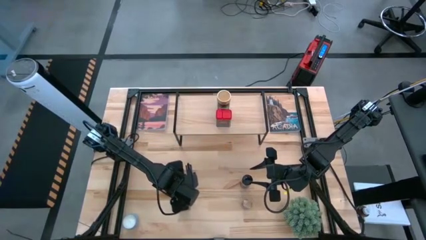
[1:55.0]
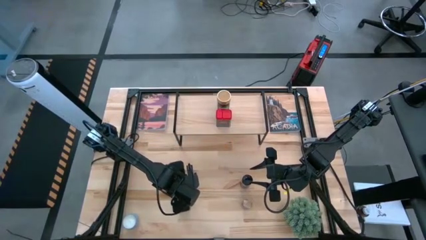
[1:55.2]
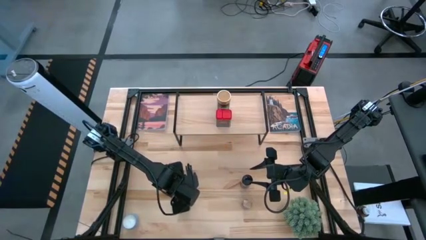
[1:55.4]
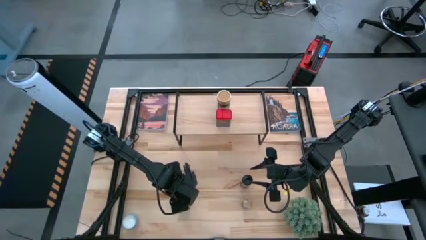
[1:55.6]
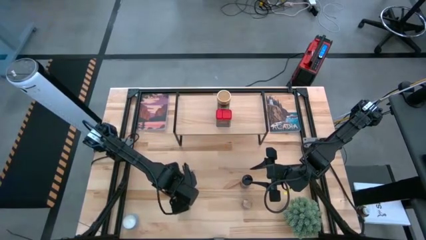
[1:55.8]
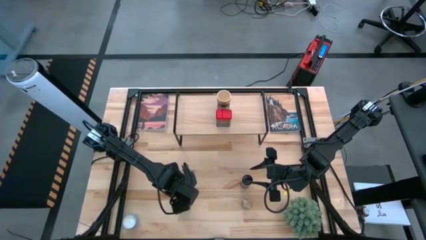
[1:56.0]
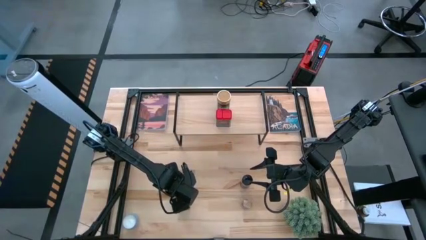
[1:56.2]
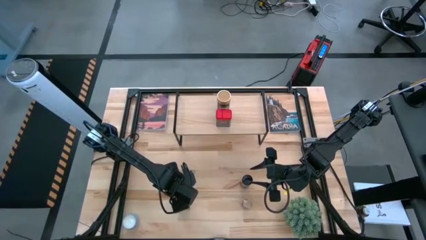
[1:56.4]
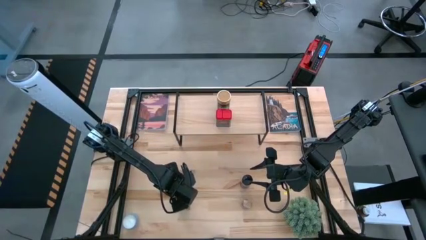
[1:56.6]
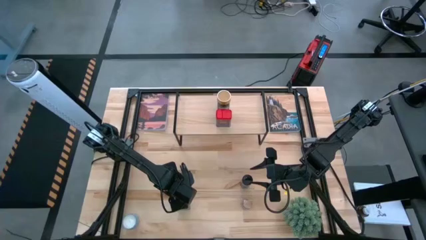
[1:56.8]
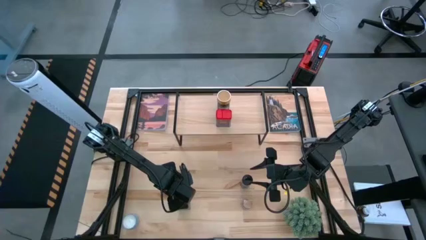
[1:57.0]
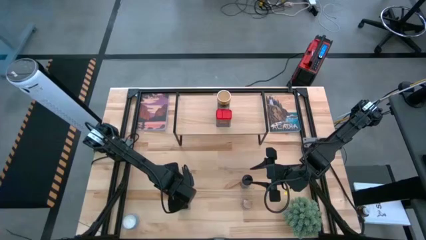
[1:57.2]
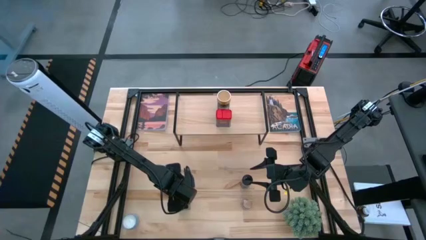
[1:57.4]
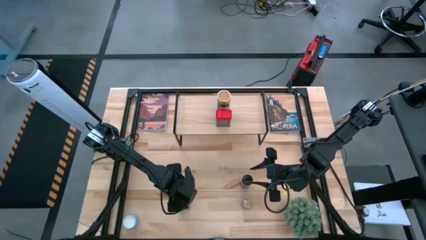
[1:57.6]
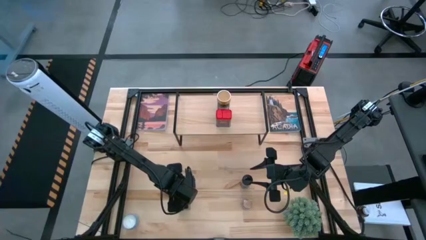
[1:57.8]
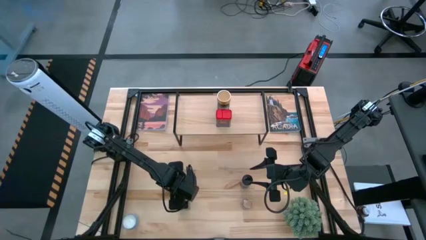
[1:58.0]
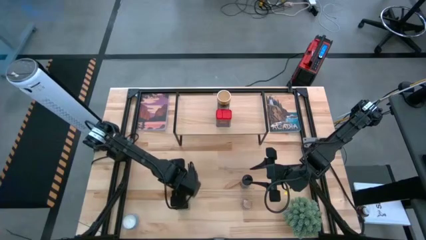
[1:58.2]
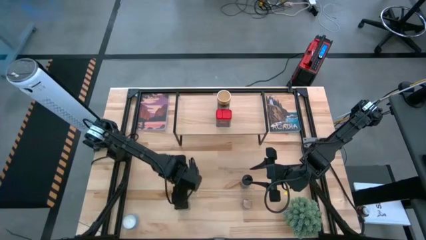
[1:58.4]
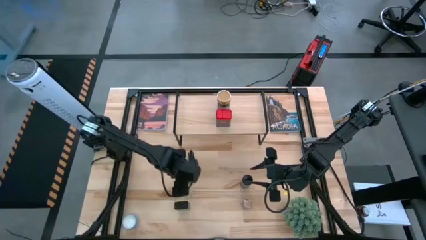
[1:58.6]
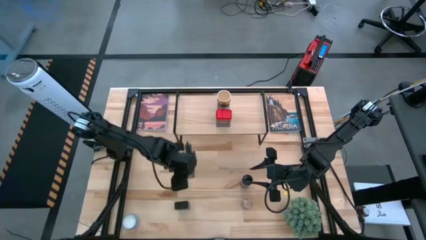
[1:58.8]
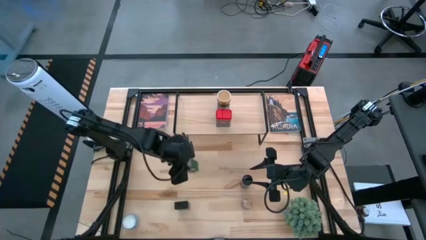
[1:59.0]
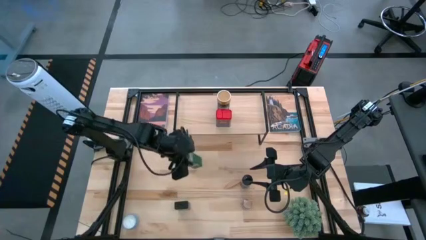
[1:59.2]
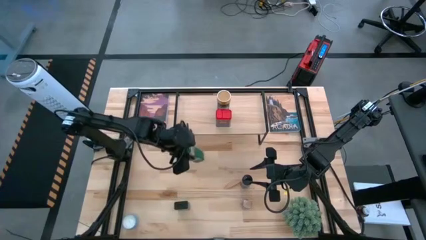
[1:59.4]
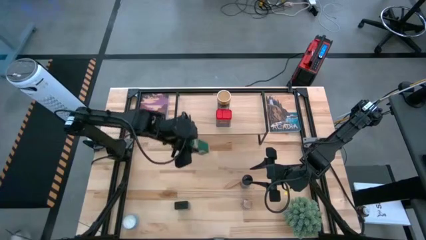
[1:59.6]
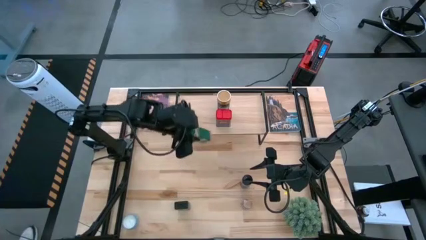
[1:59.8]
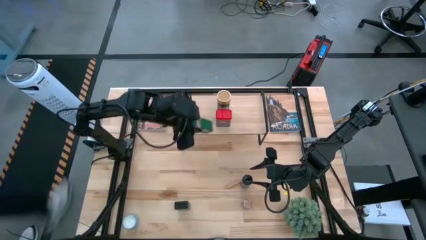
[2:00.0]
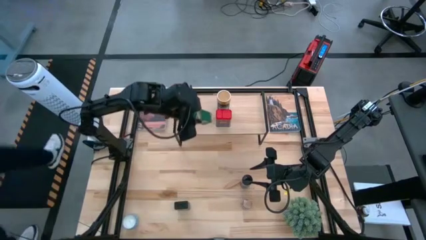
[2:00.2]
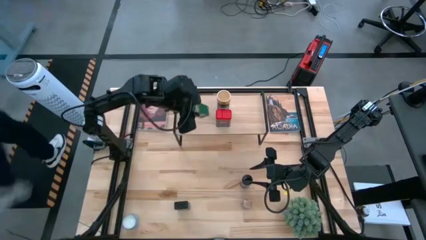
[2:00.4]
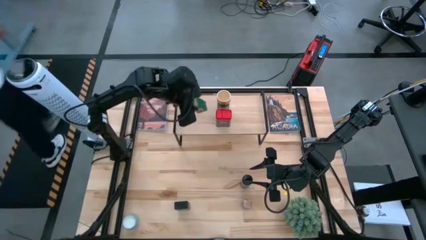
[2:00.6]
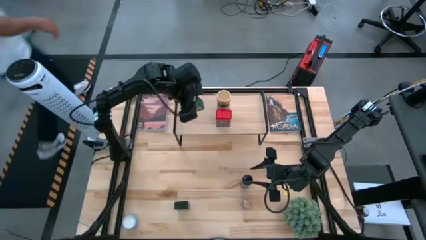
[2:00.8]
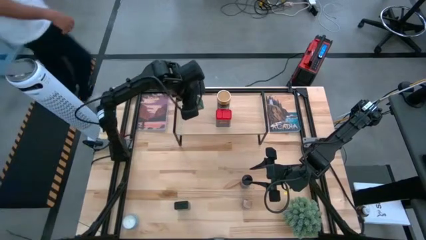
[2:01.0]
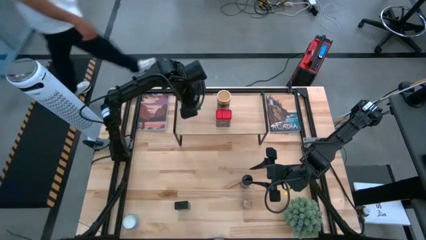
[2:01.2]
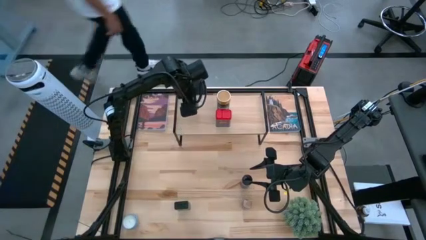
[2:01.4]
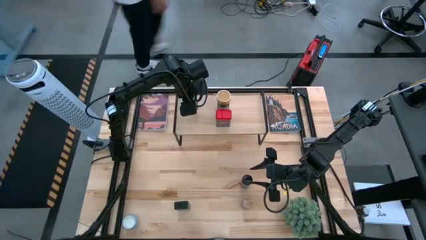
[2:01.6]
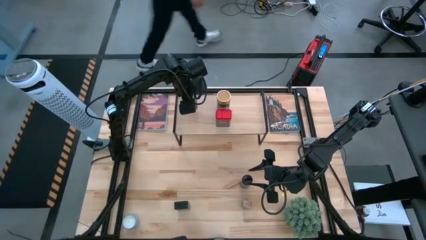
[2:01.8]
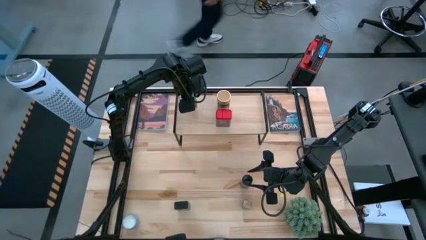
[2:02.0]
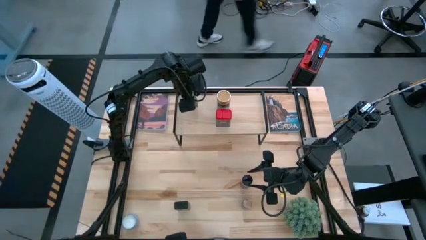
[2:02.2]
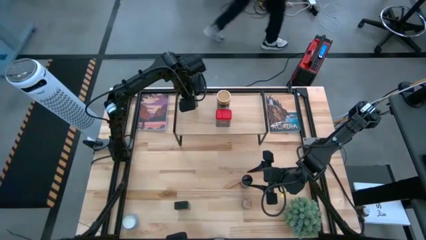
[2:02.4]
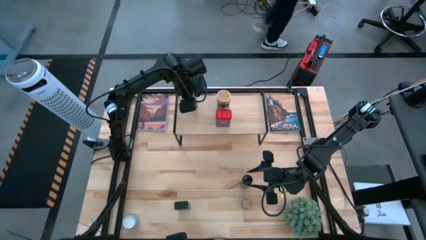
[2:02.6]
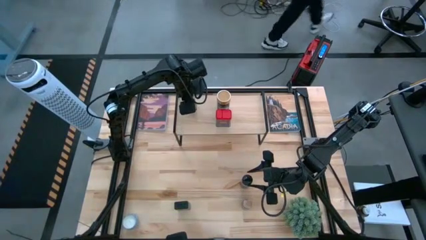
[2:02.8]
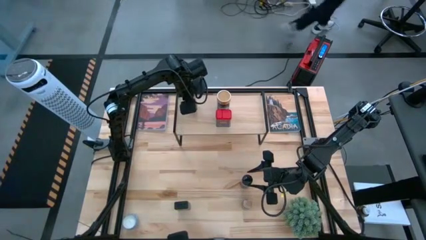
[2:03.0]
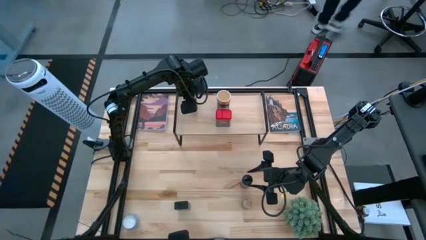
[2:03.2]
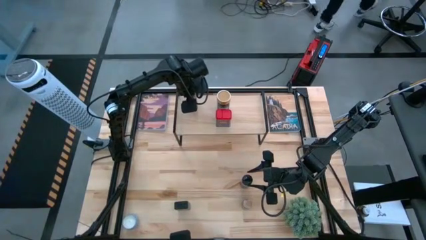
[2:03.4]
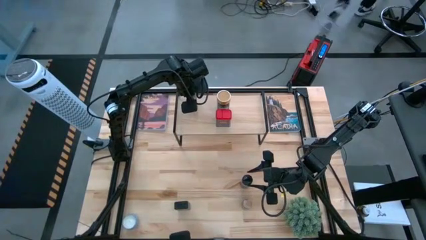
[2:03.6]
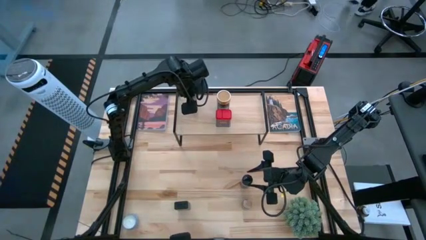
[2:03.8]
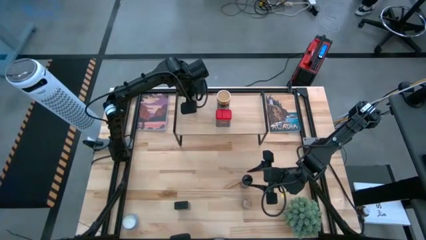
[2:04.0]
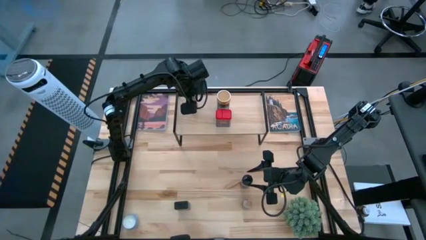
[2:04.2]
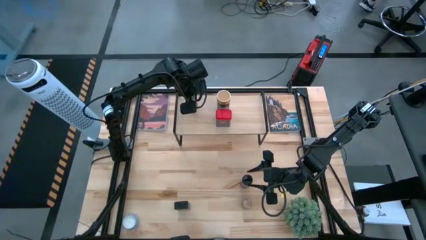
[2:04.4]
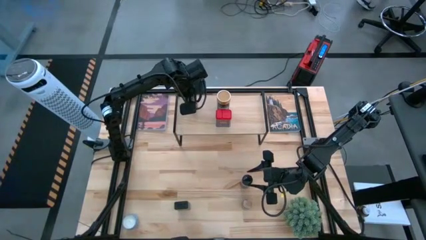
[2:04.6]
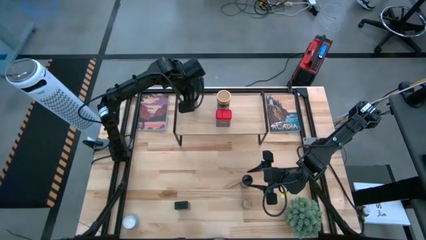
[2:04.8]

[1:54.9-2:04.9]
Task: Shelf spices
Put the green seasoning bottle on the shelf

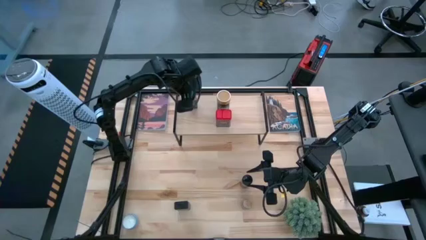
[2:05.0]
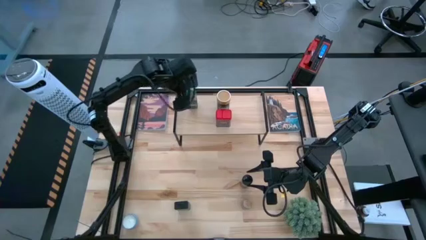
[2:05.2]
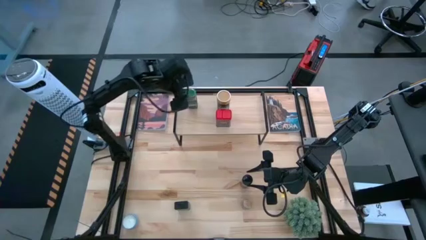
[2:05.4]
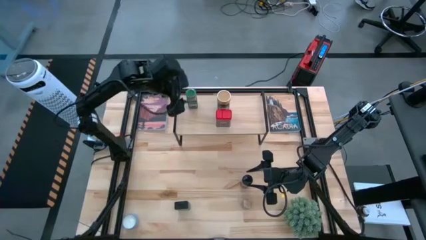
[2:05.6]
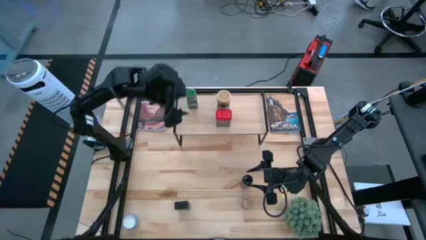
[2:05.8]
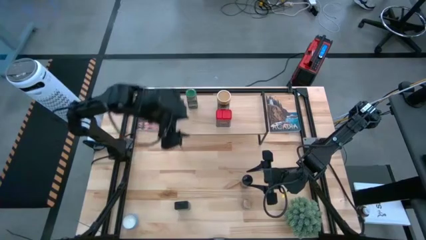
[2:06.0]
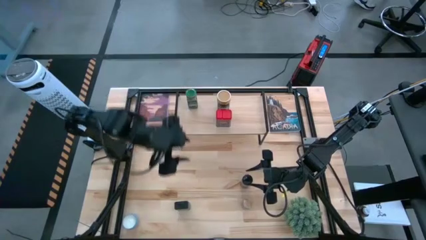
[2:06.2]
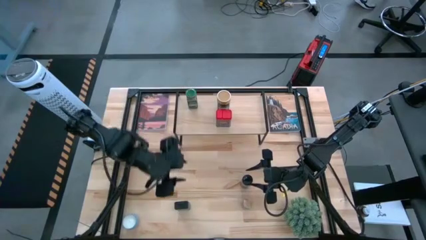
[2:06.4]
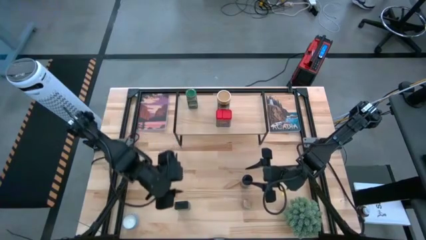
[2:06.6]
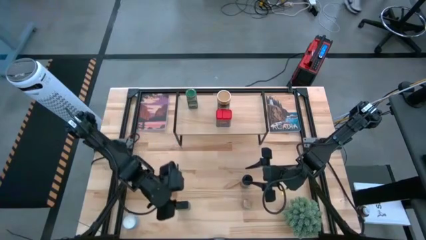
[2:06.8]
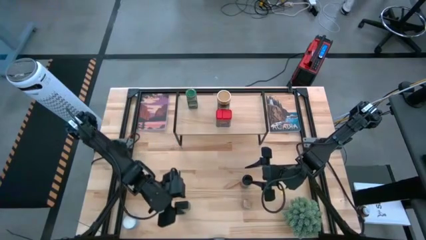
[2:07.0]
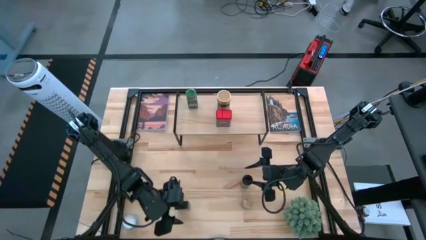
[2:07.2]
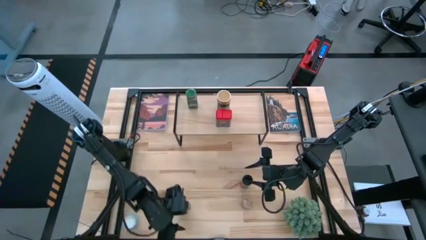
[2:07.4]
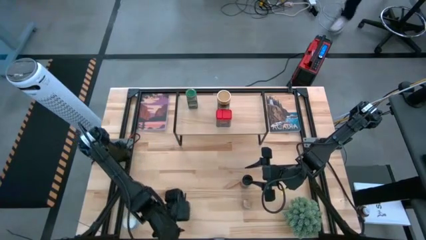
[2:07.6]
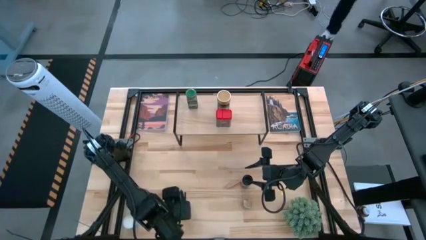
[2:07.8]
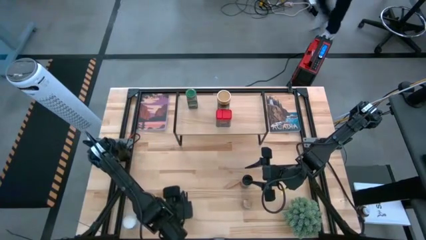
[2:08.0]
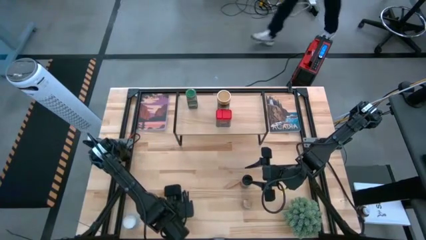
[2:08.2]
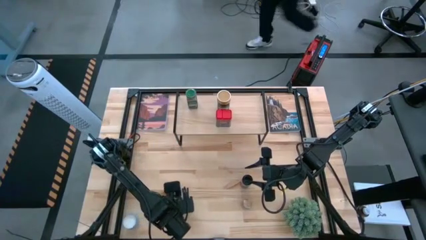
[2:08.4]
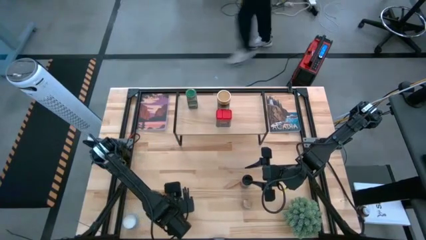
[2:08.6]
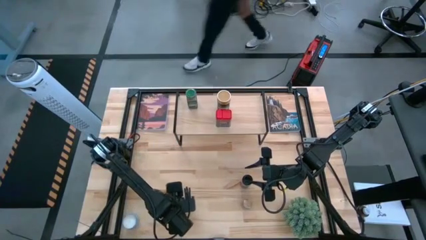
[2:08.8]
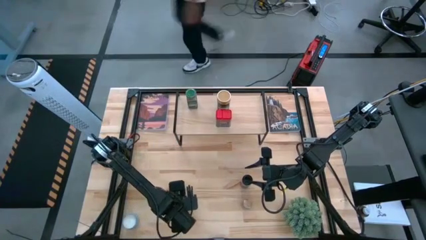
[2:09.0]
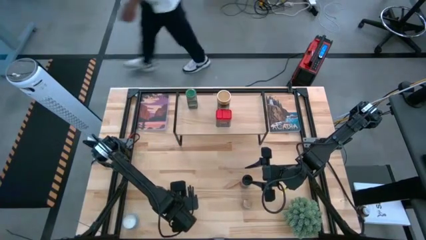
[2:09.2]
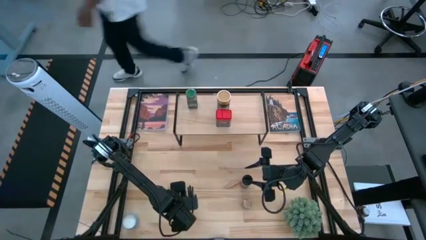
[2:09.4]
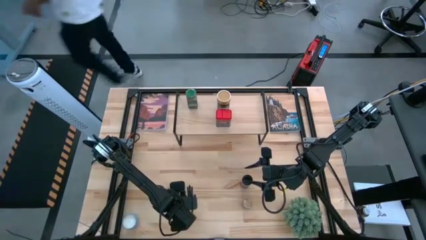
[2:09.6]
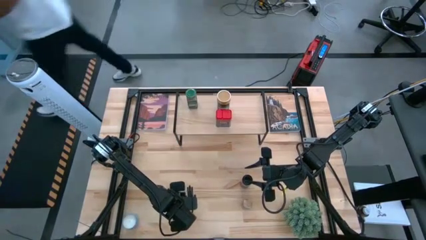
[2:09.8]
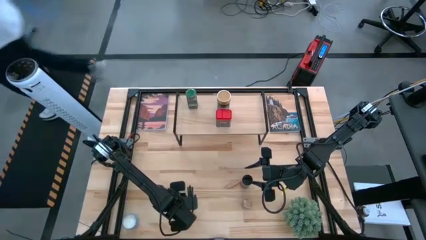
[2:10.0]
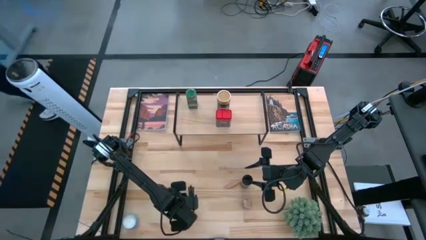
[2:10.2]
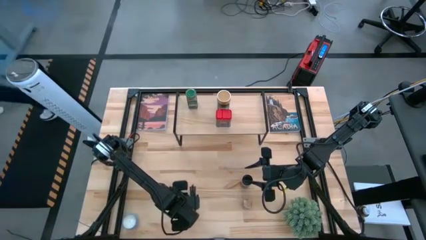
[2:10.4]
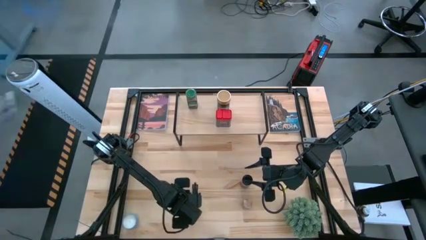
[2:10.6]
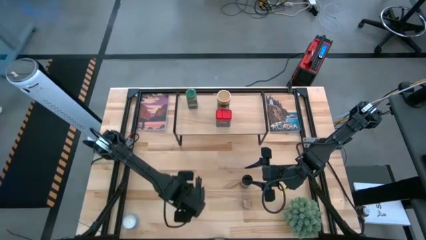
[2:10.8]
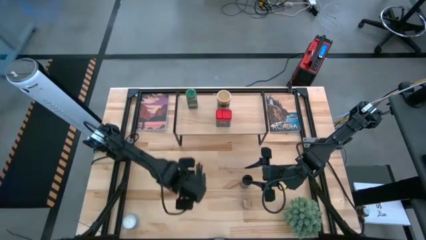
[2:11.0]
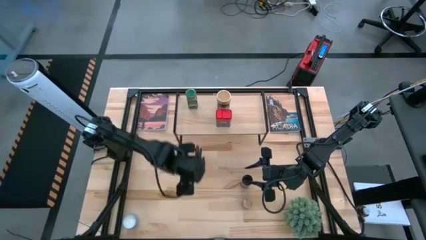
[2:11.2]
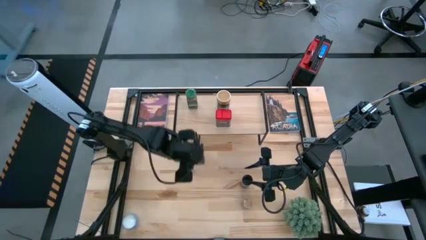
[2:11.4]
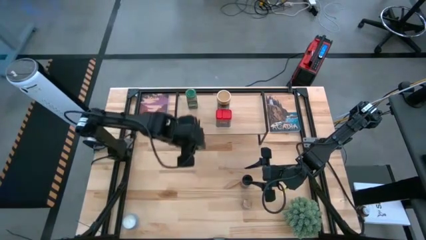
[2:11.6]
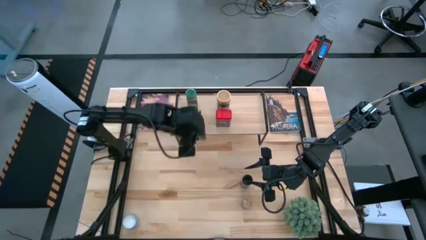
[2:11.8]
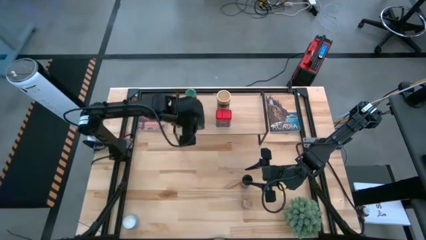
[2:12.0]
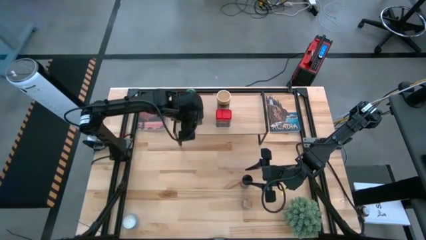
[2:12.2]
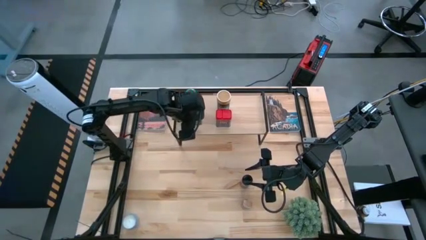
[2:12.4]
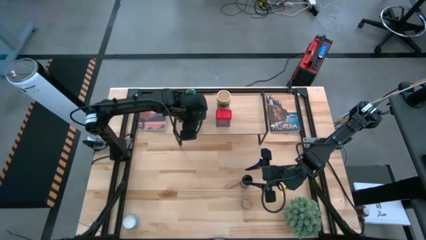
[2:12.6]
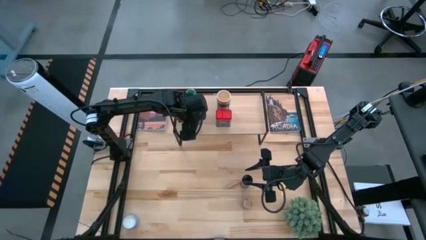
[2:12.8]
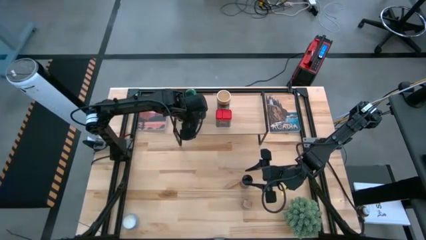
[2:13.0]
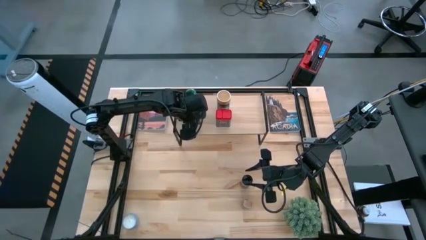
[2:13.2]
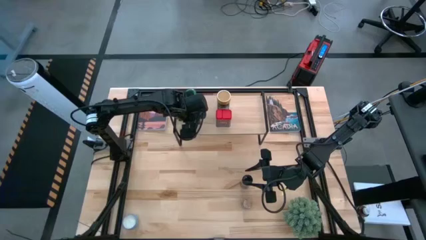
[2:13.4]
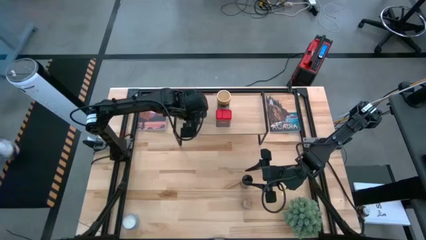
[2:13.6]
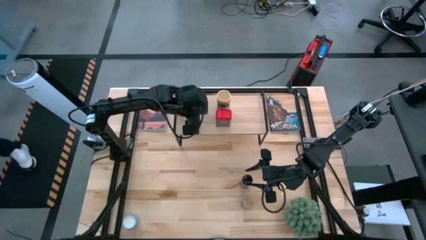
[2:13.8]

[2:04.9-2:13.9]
Put the black seasoning can on the shelf
